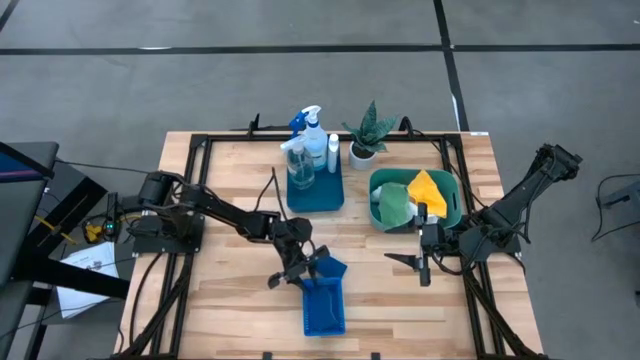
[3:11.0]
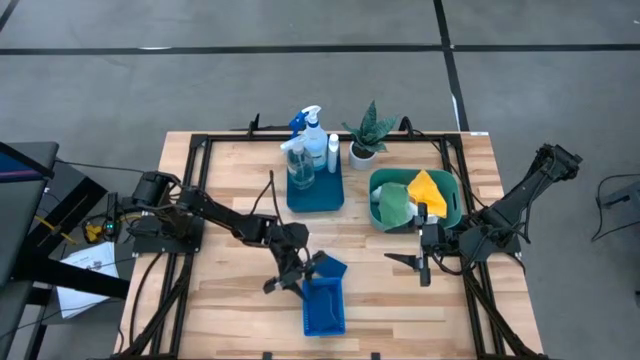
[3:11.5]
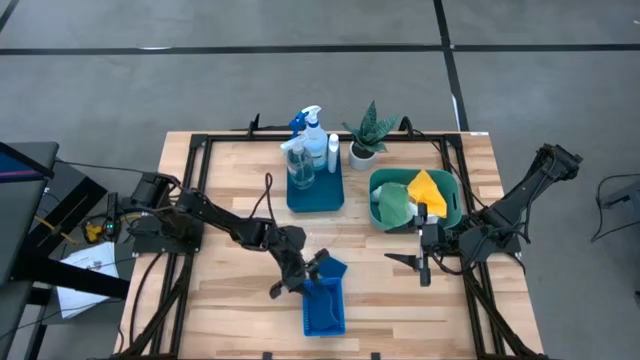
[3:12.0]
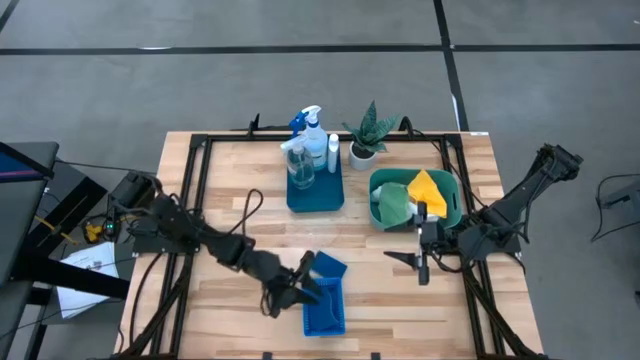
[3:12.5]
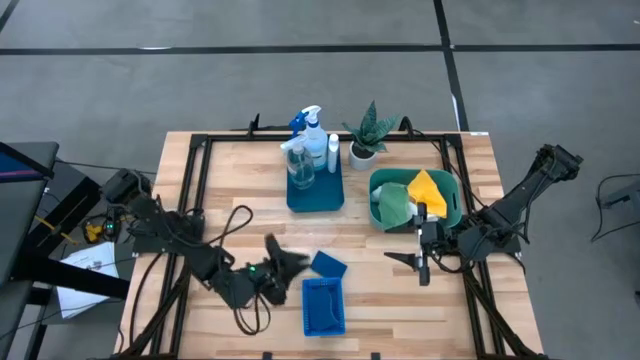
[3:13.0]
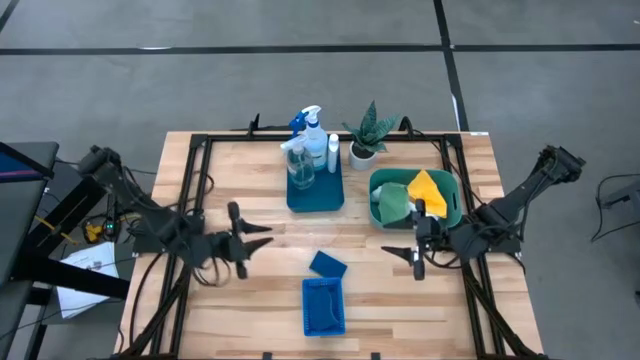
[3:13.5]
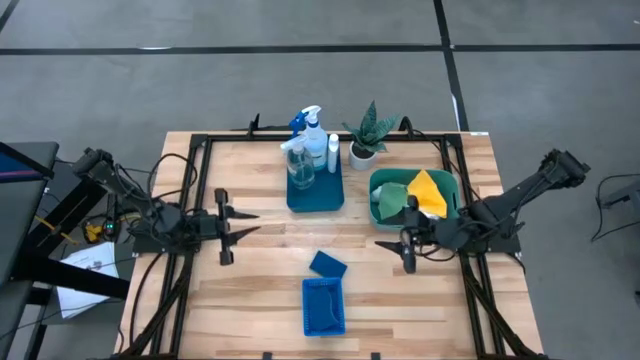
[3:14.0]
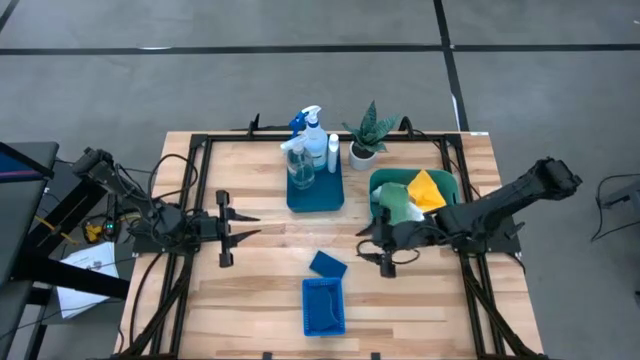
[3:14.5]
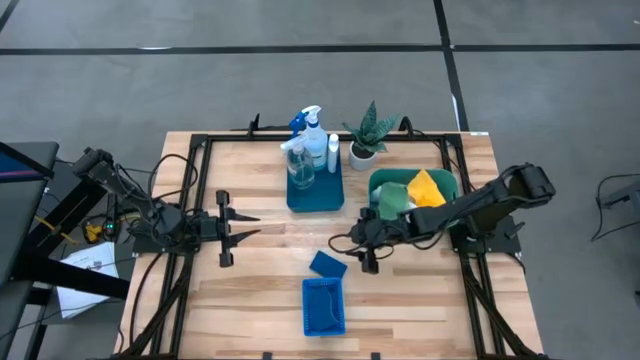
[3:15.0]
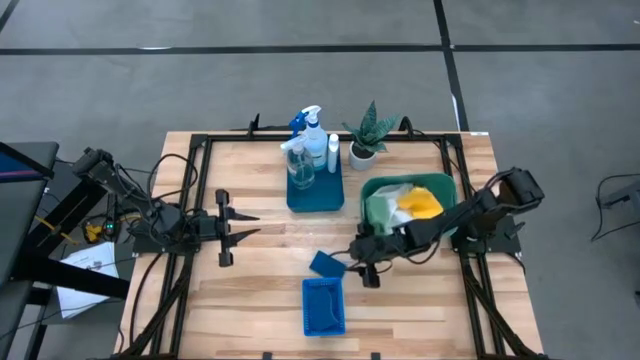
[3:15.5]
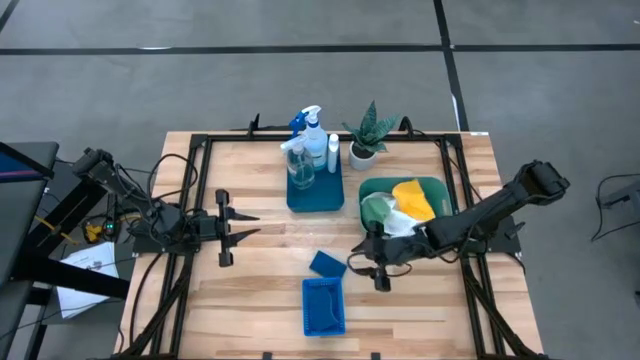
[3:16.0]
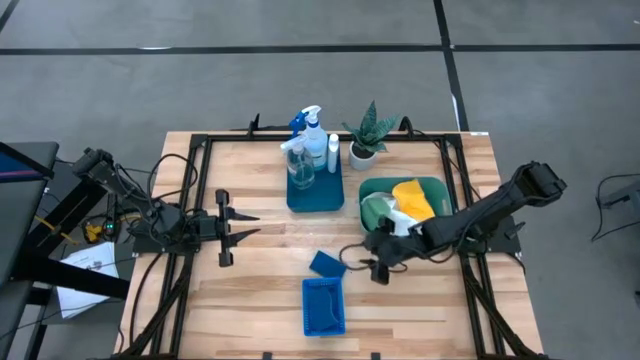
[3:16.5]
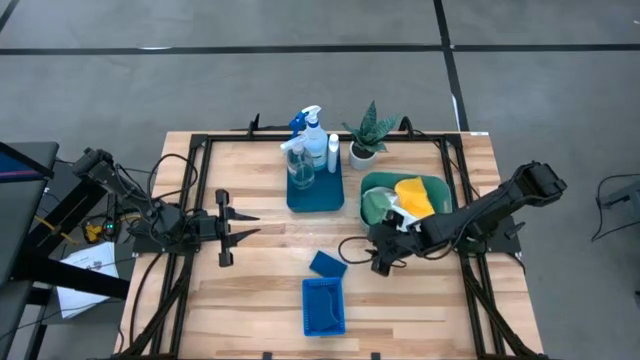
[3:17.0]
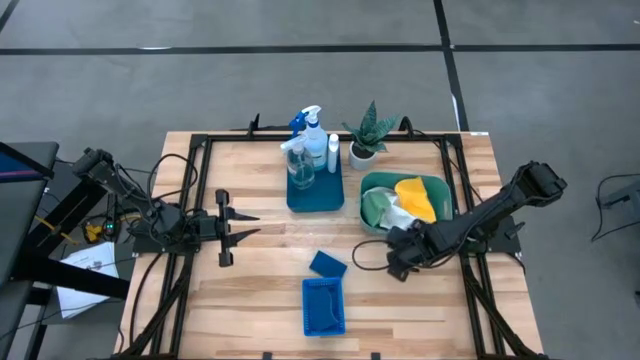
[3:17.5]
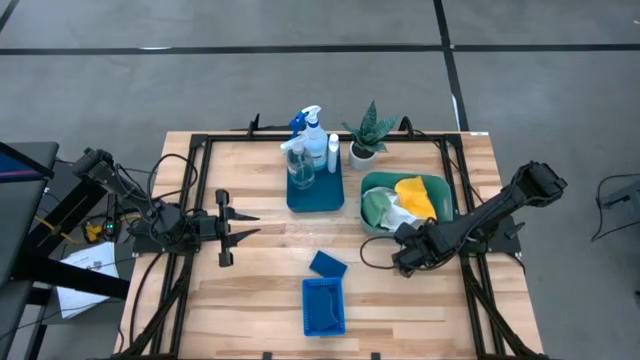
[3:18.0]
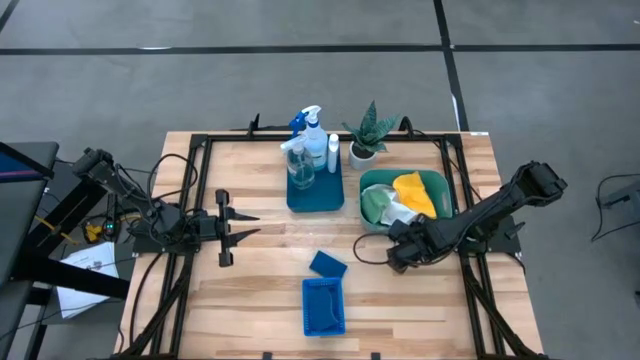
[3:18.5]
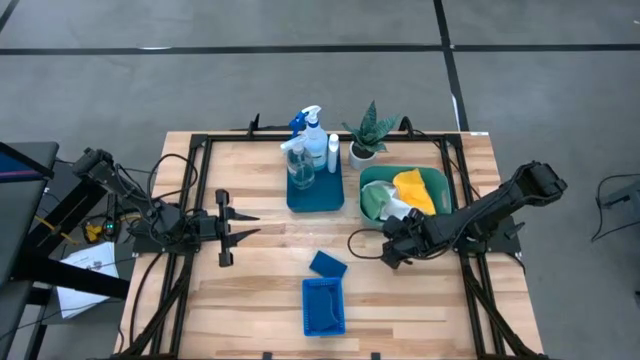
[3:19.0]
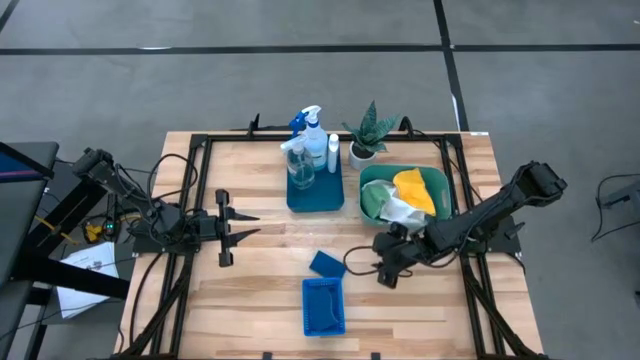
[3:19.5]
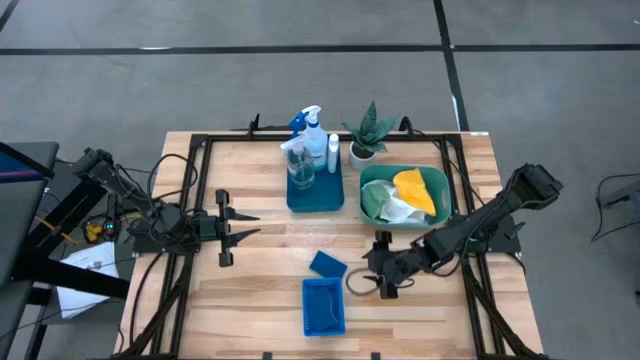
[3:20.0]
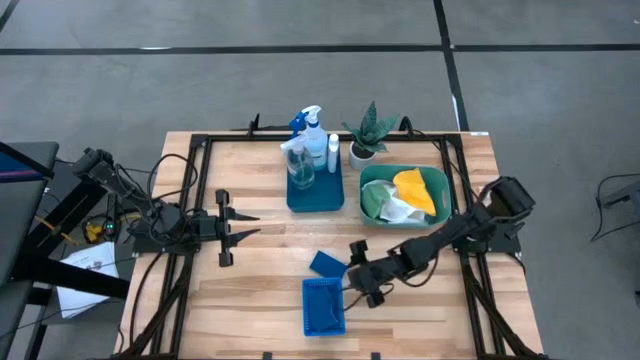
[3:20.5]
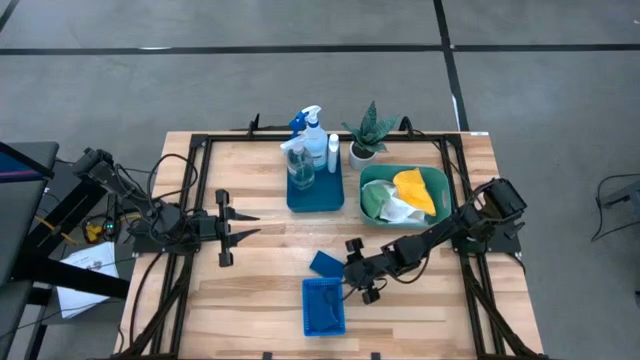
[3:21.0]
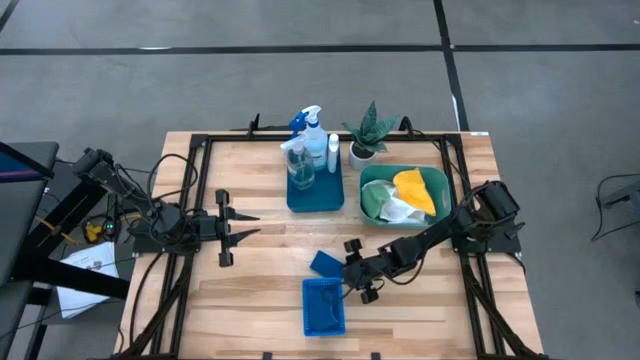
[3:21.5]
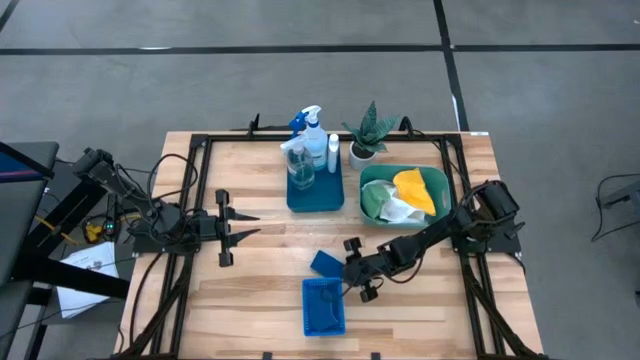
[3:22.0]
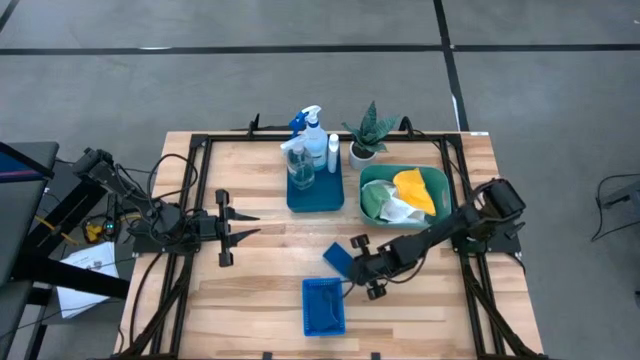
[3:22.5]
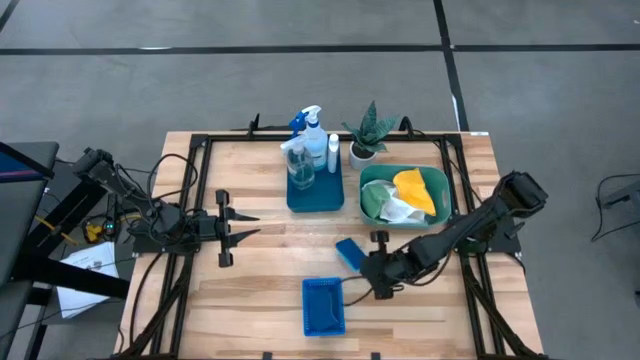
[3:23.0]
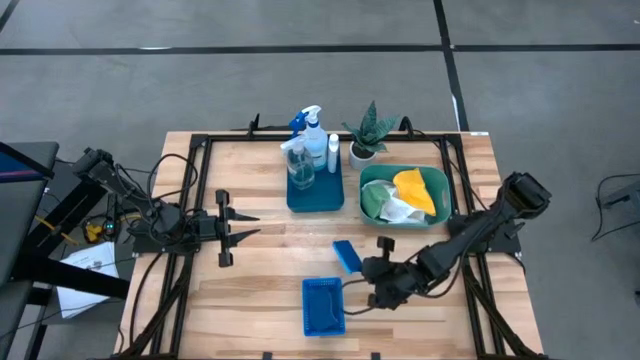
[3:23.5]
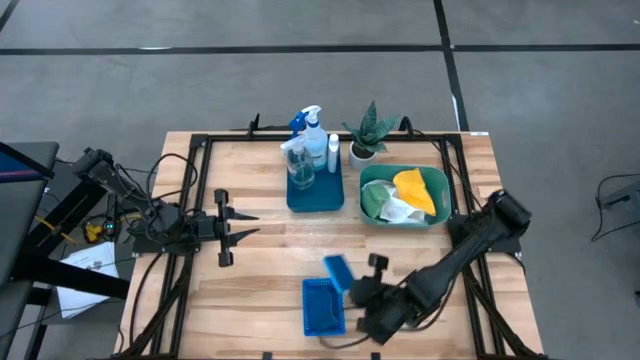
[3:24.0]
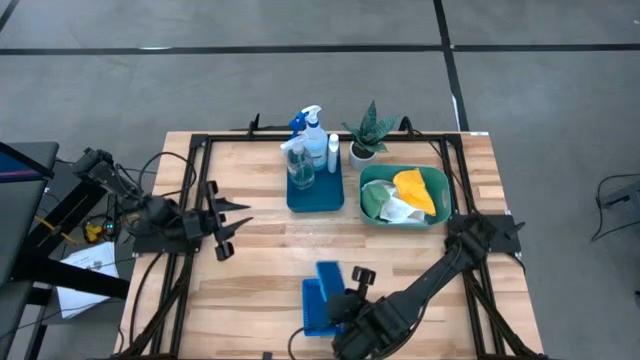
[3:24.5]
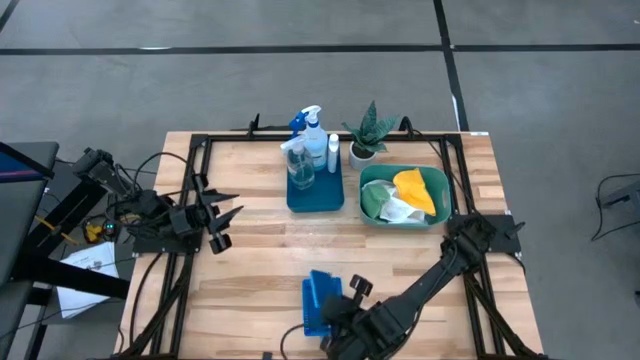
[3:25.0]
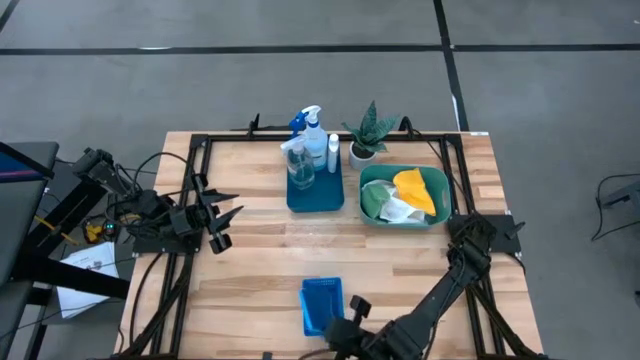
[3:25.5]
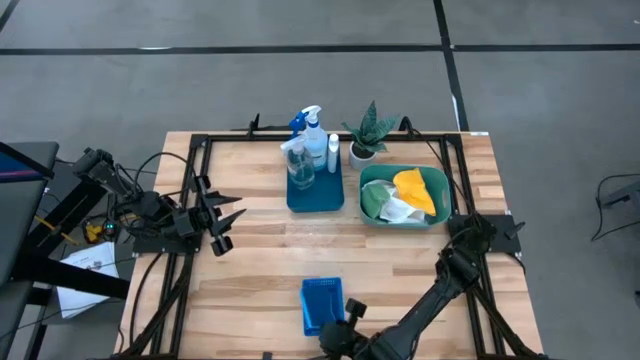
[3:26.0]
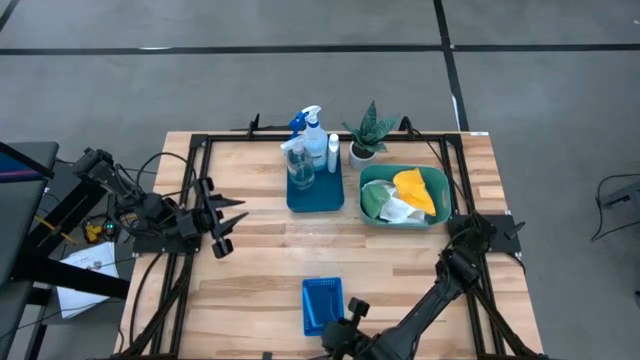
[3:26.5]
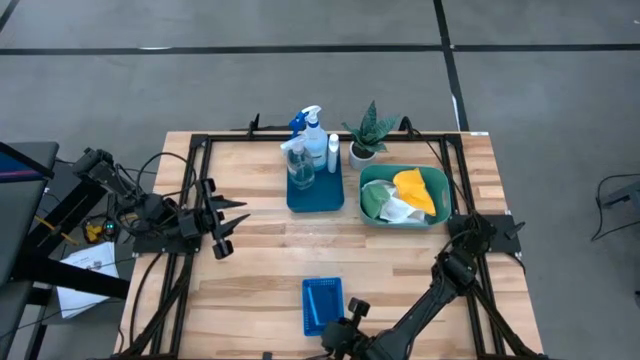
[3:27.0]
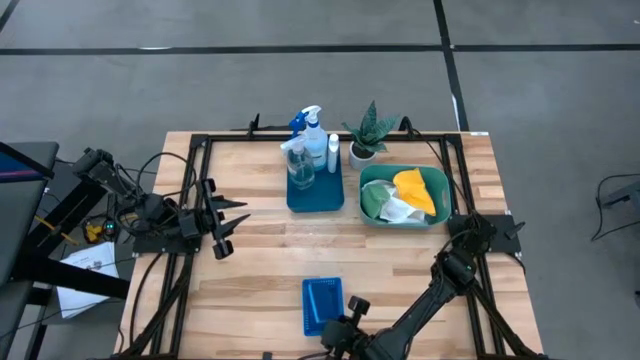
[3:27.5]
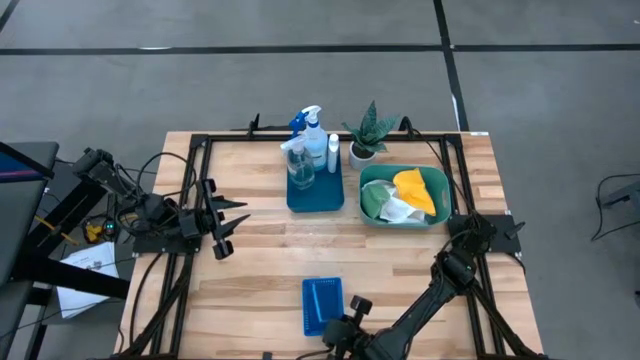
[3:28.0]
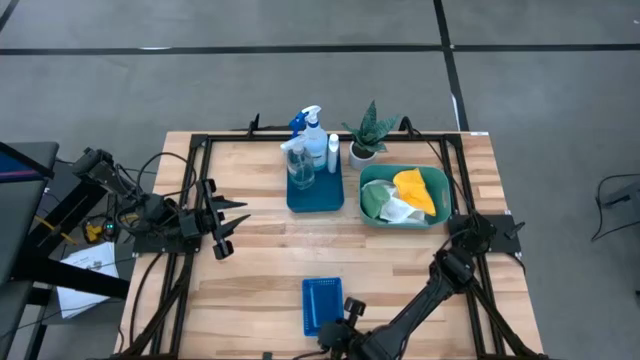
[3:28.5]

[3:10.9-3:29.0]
Task: Pick & Place Kitchen Items
Put the blue sponge into the blue basket

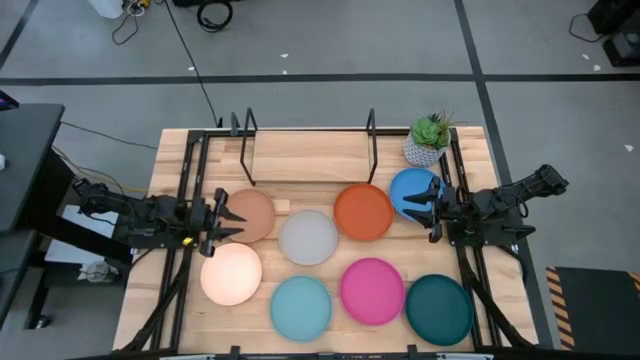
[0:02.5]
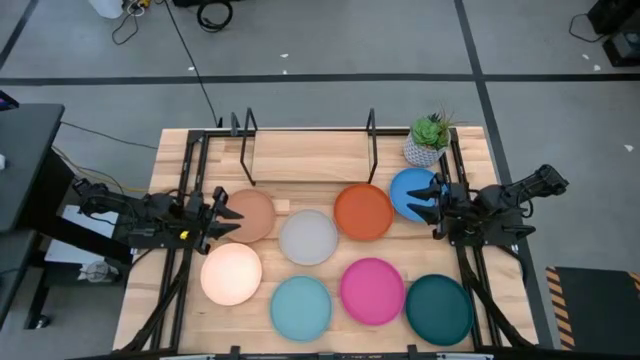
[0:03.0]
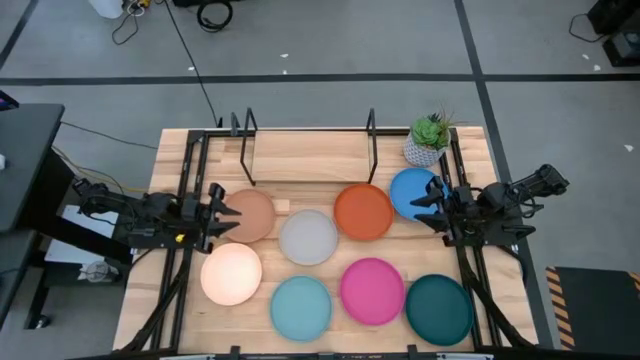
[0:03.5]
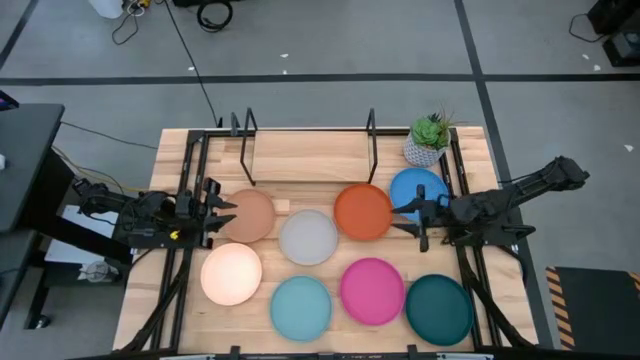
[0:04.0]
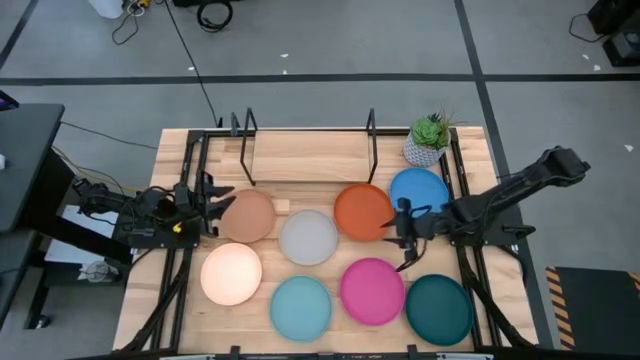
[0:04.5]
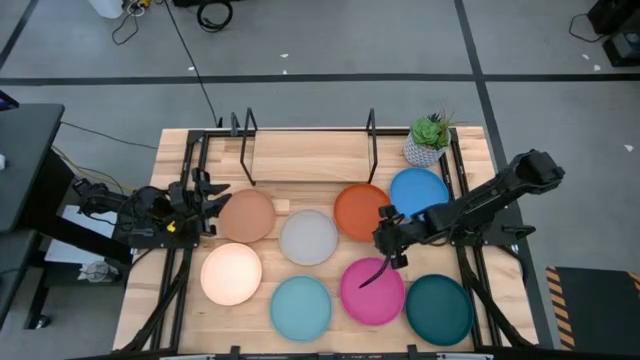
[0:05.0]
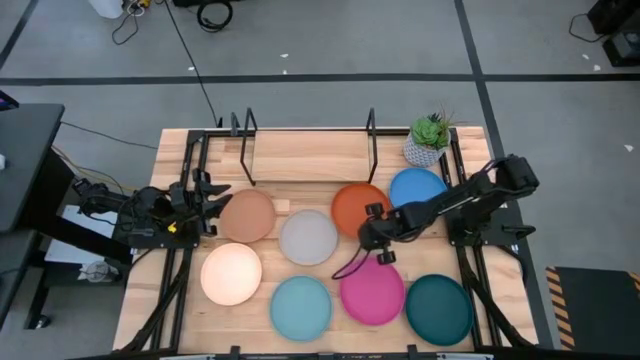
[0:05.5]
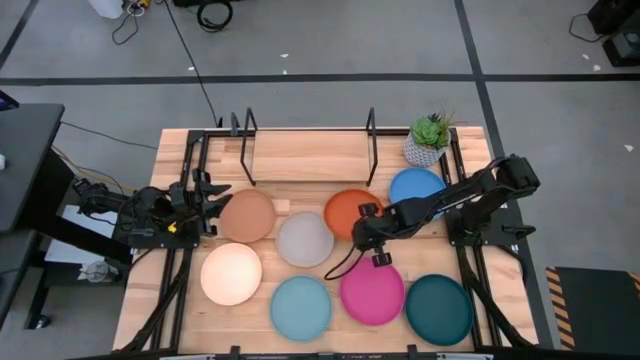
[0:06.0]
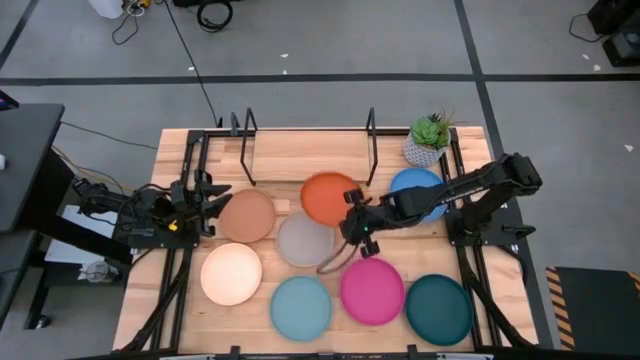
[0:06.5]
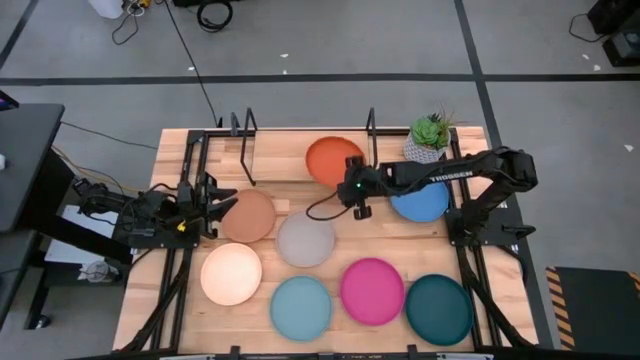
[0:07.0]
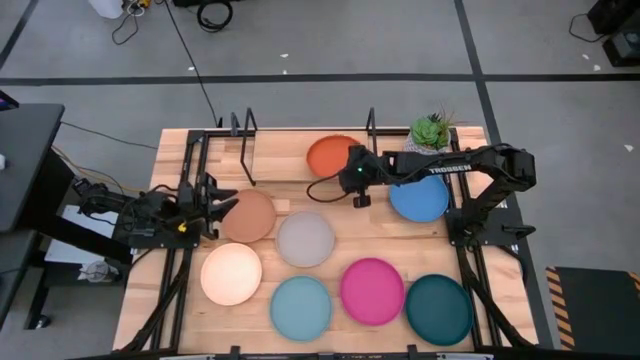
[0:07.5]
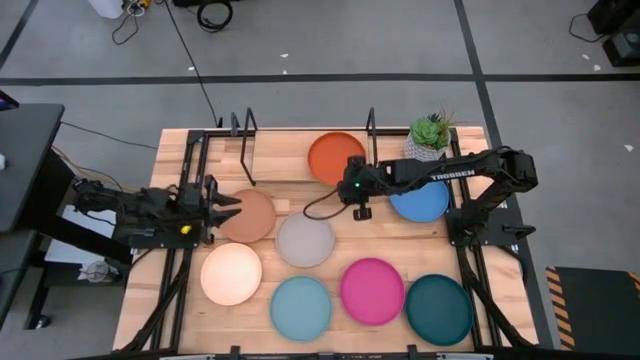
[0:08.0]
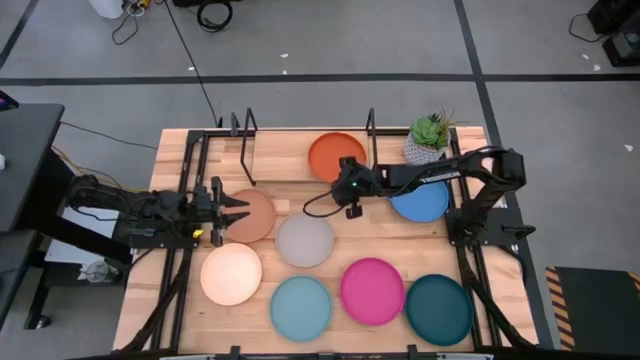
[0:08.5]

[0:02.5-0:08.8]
Task: Place and stack plates onto a shelf
Put the orange plate on the shelf
